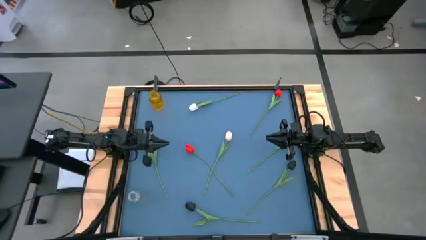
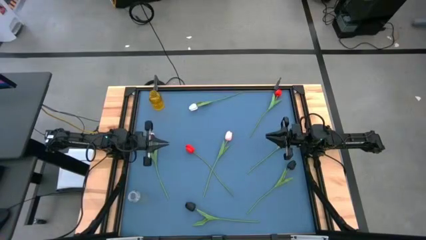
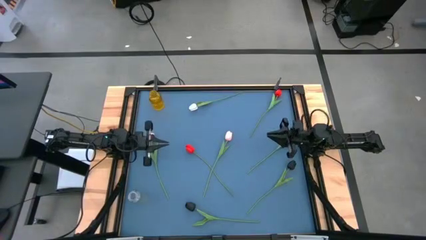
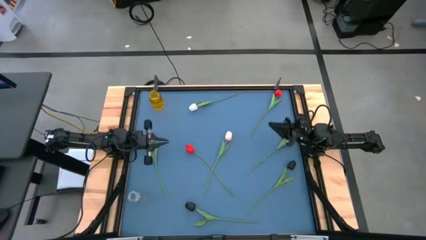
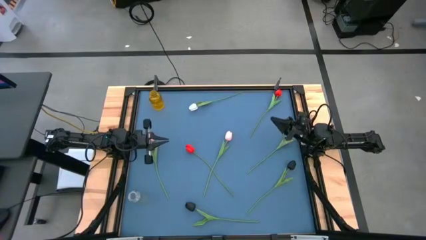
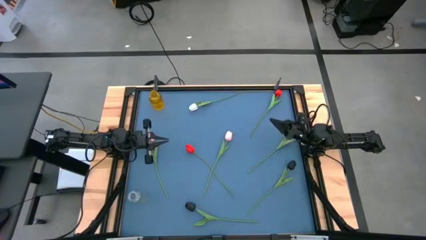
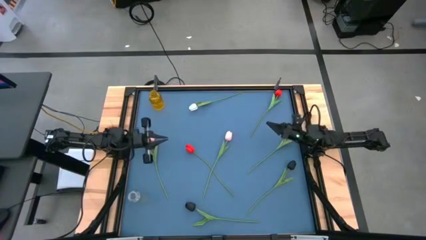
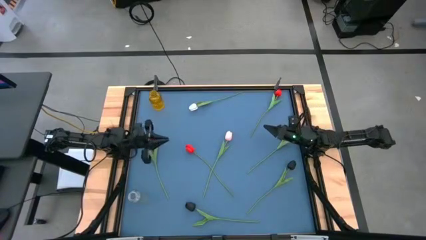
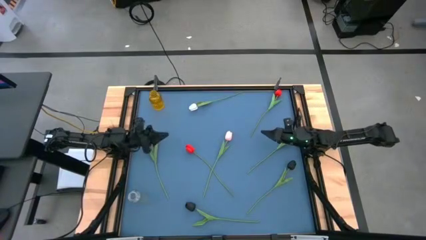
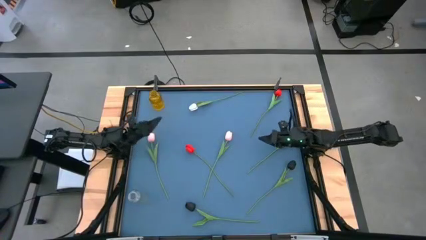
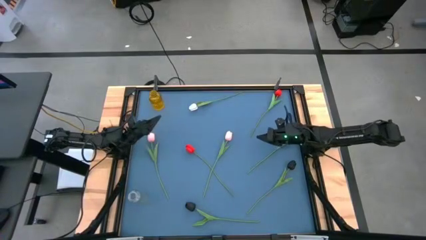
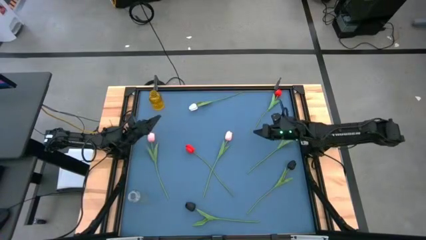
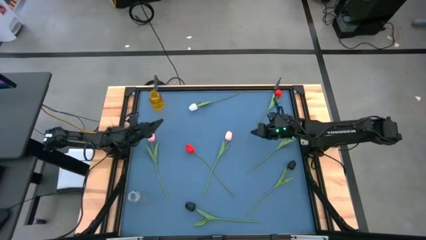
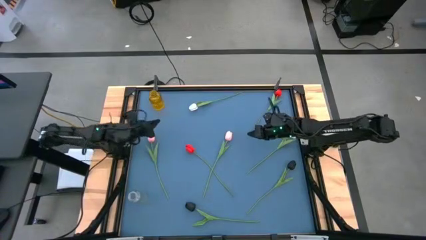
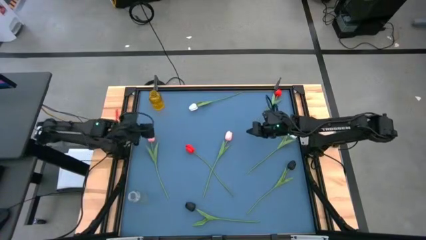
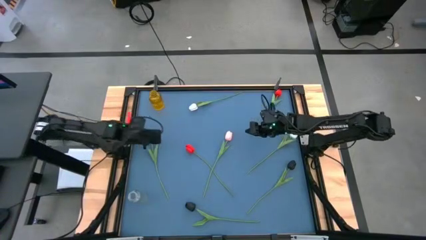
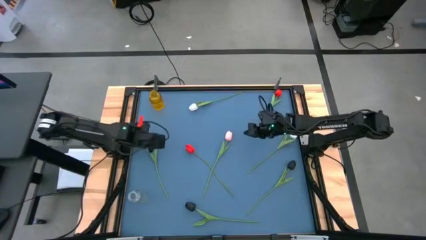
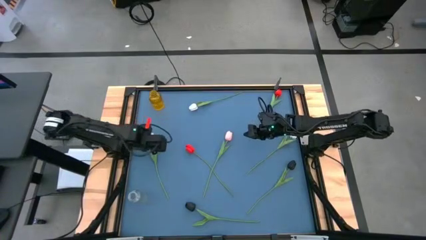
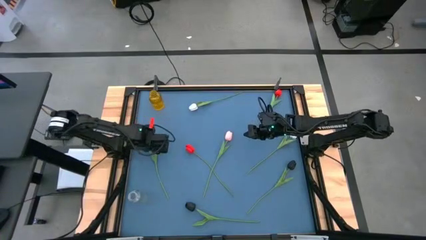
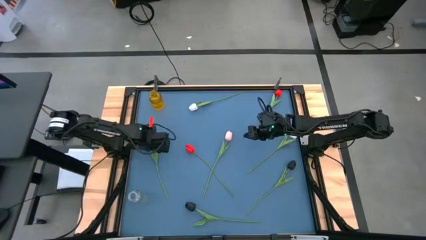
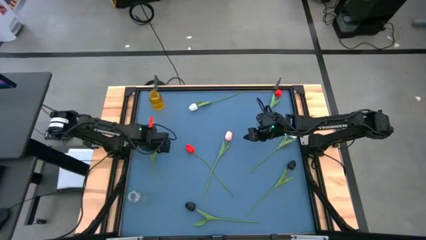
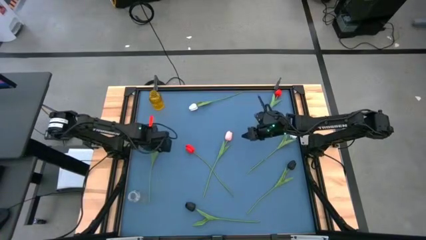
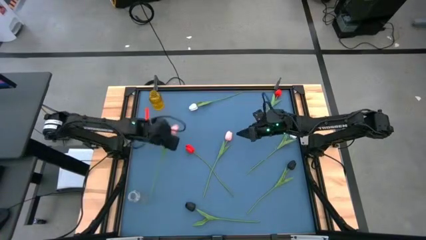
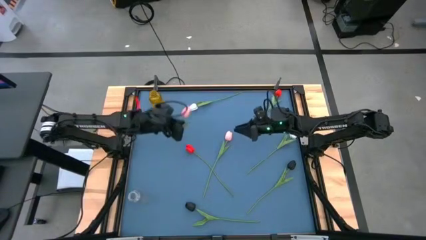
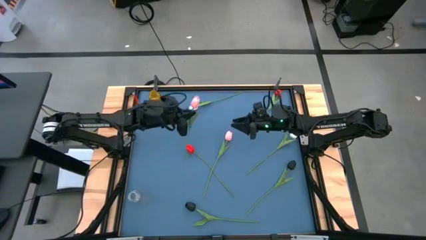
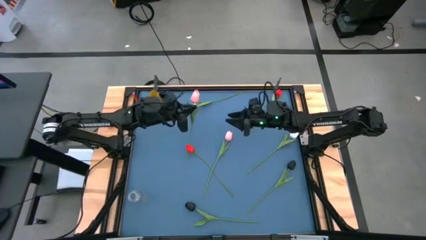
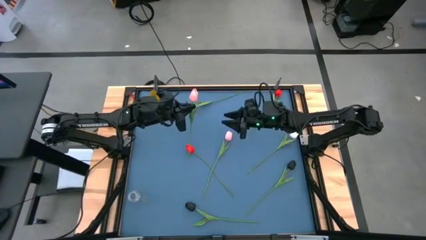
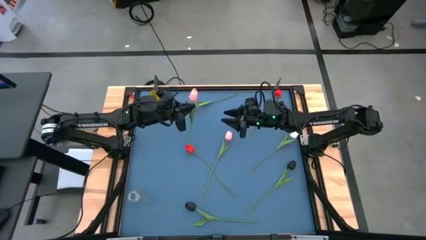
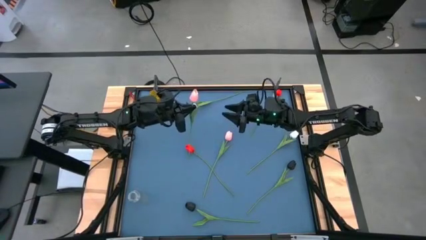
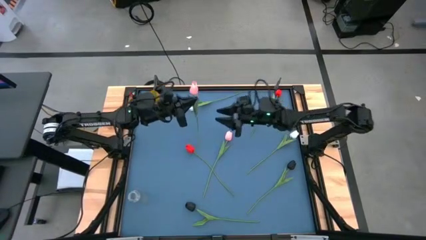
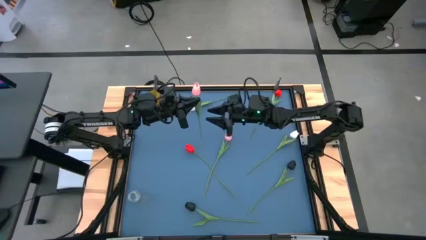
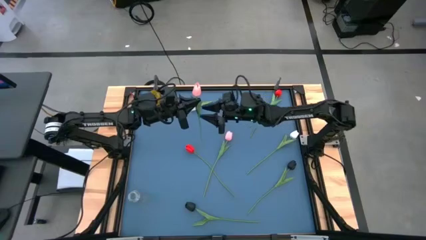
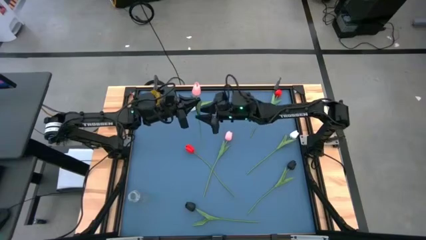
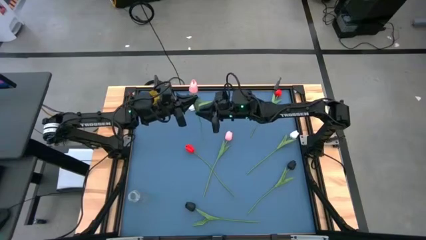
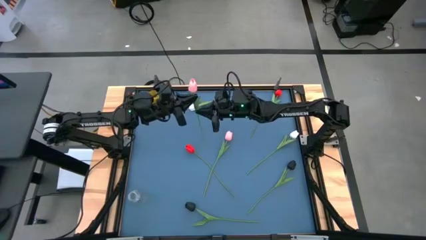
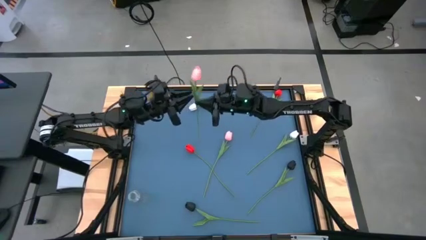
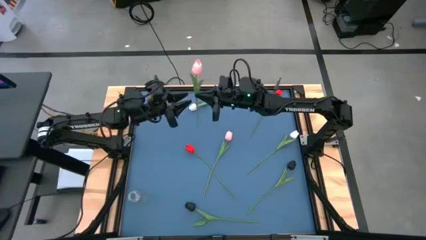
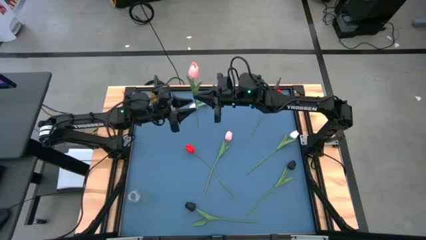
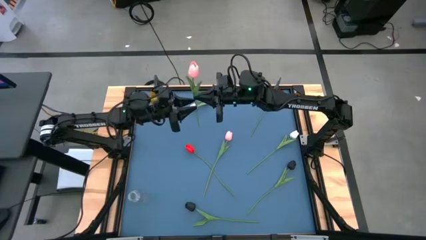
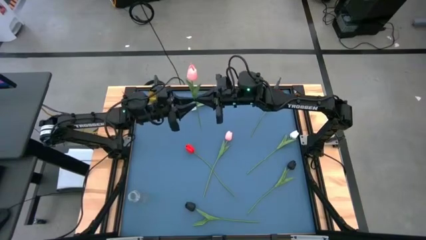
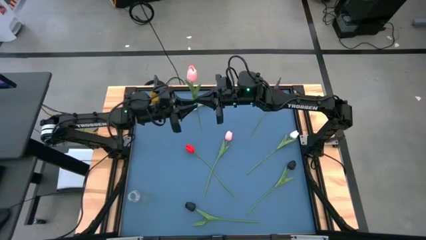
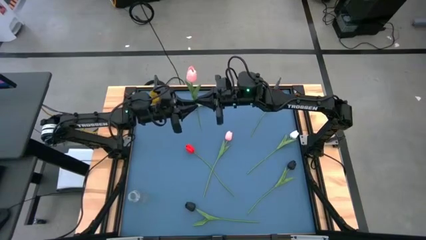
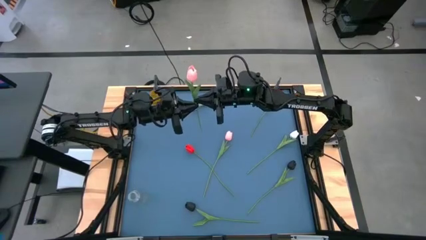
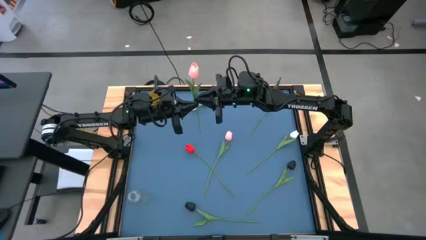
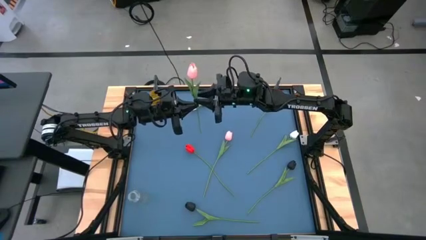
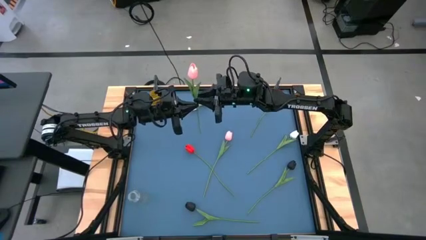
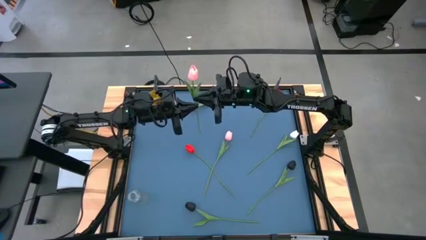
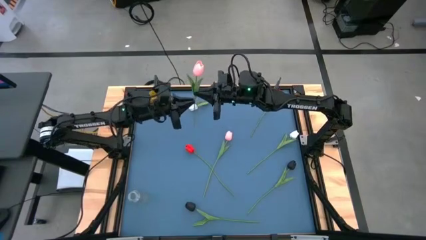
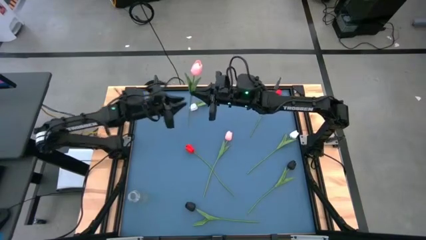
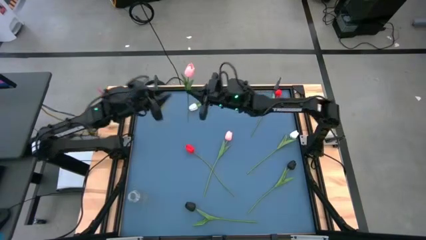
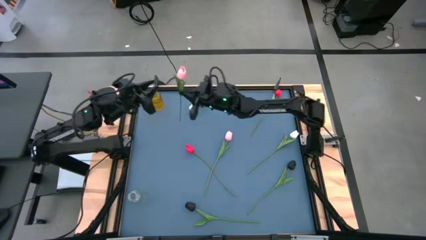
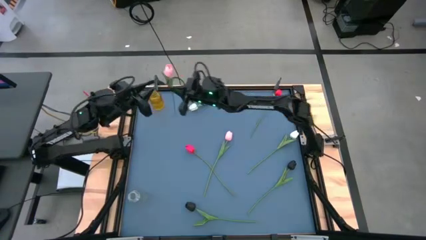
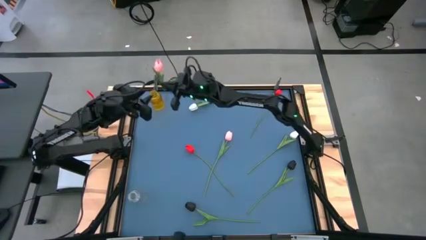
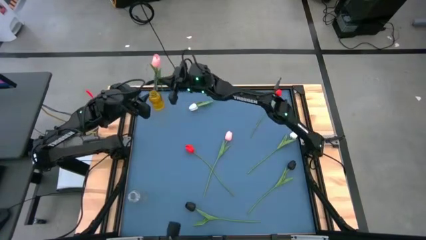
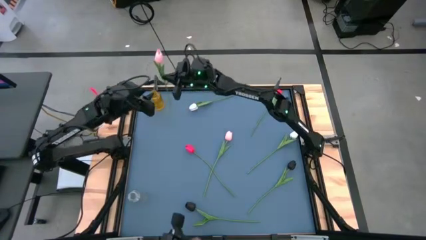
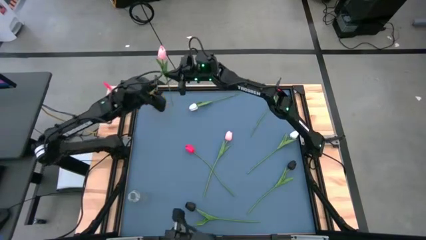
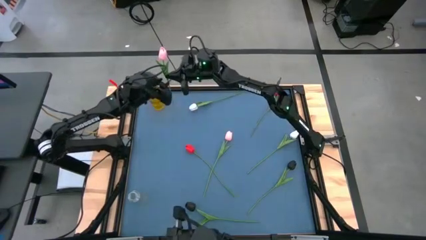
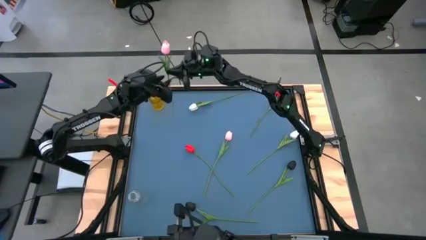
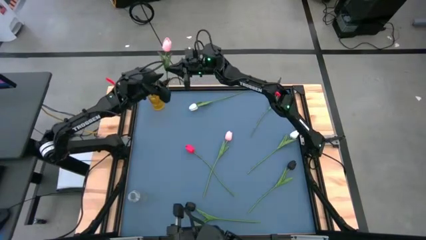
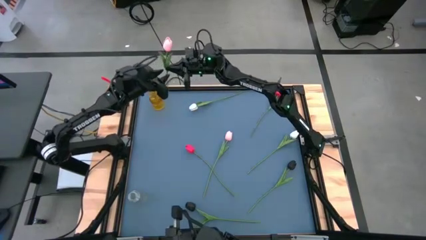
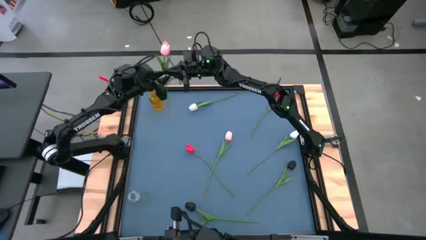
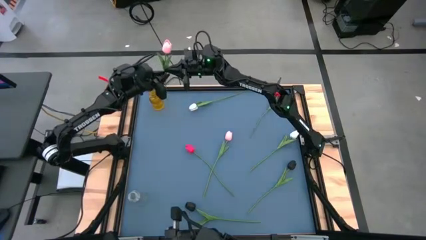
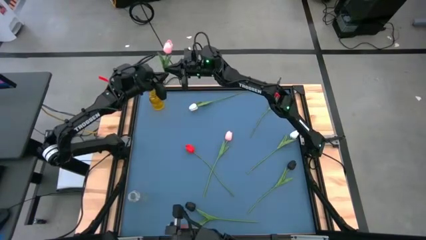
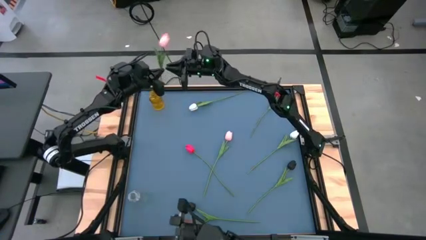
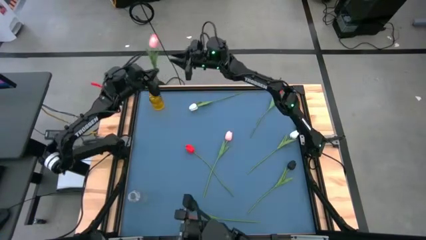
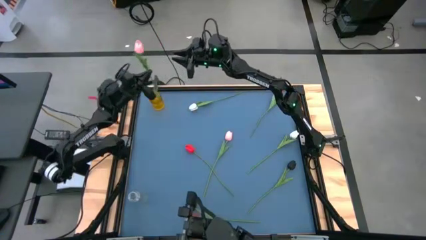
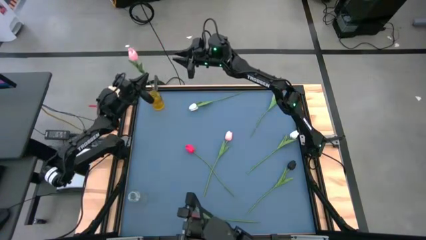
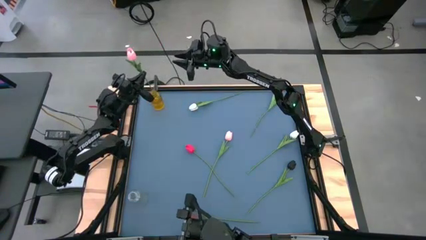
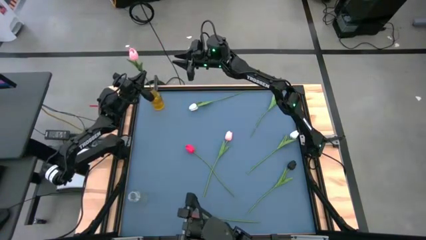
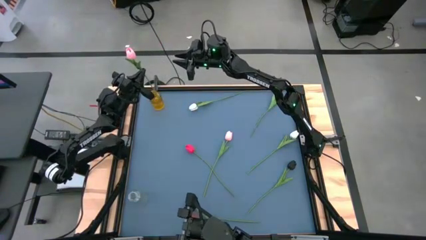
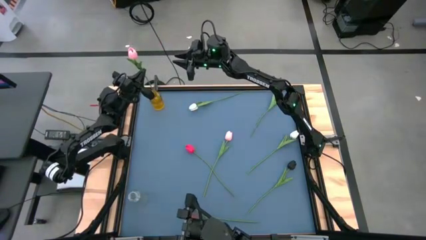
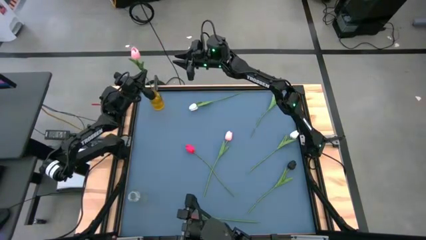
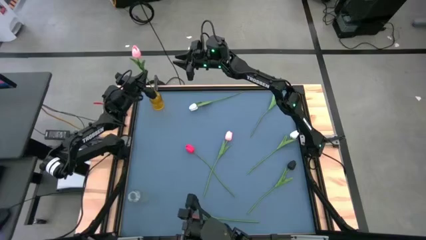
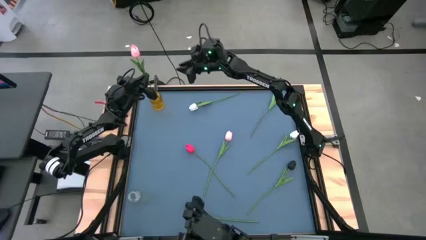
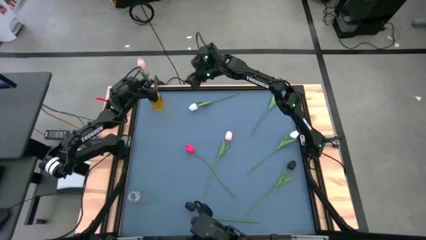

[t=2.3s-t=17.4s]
Task: Sort flowers into vase by color
Put the left pink flower into the yellow vase
